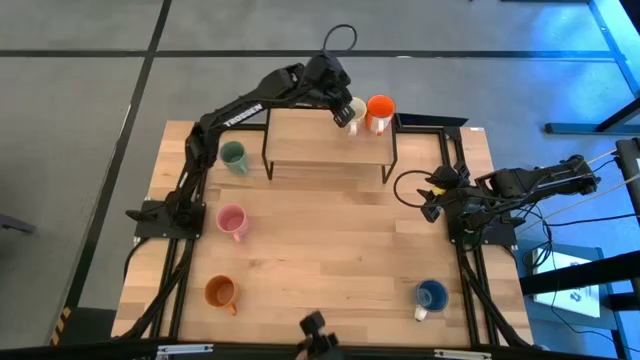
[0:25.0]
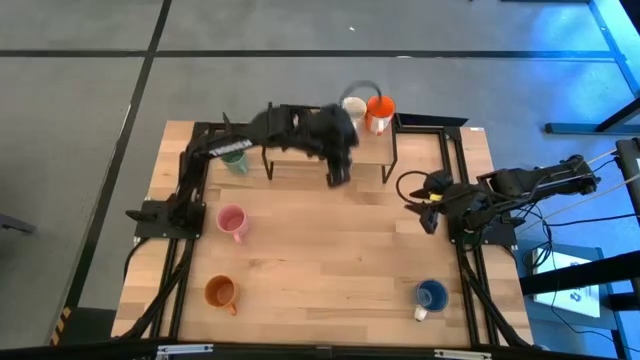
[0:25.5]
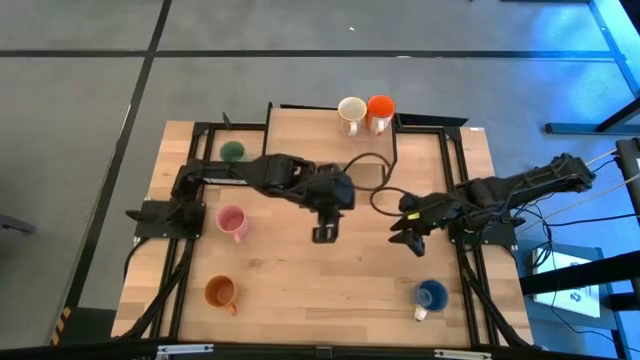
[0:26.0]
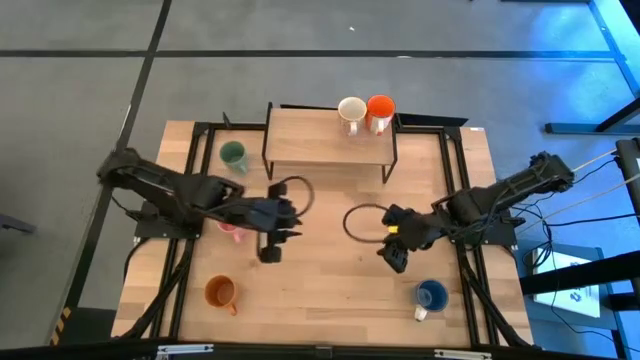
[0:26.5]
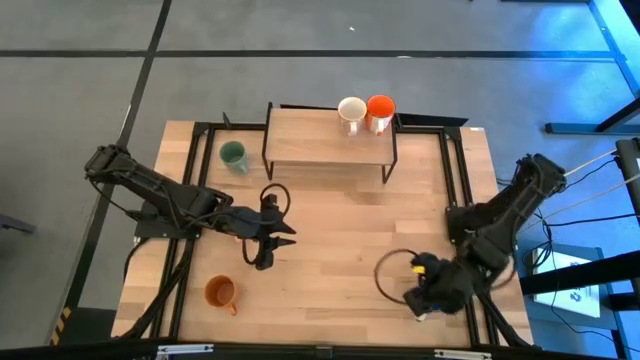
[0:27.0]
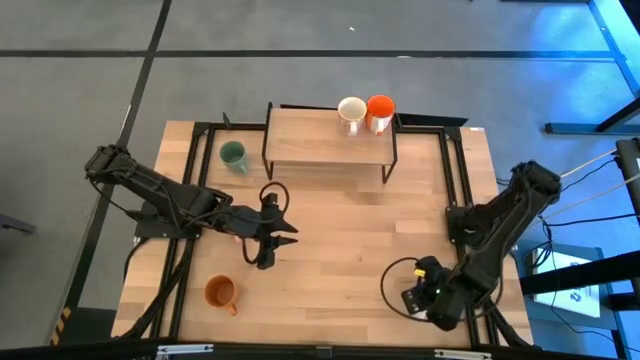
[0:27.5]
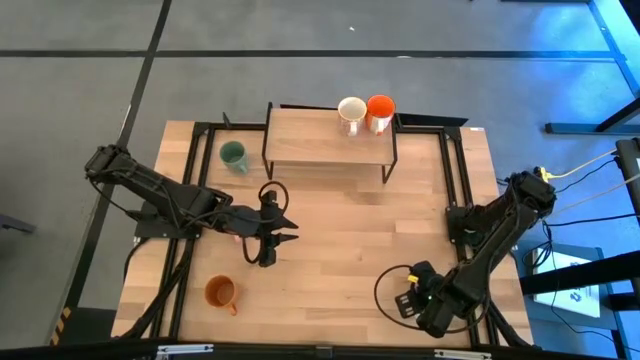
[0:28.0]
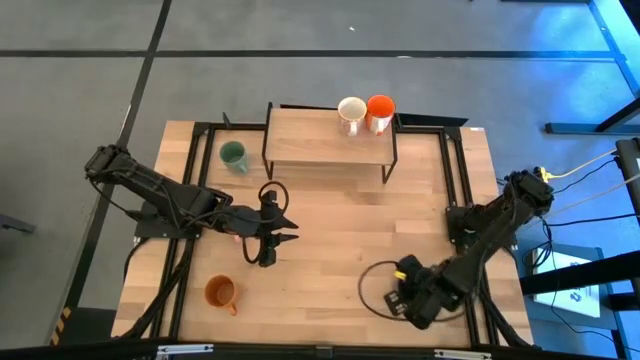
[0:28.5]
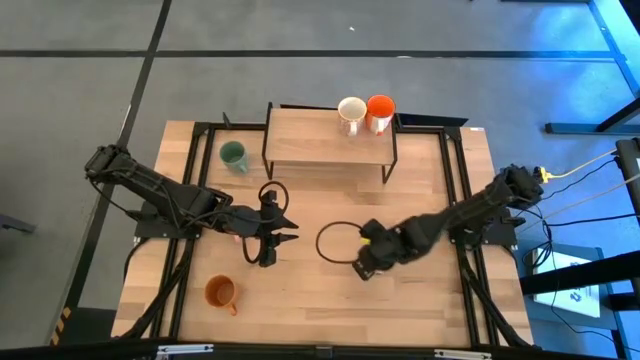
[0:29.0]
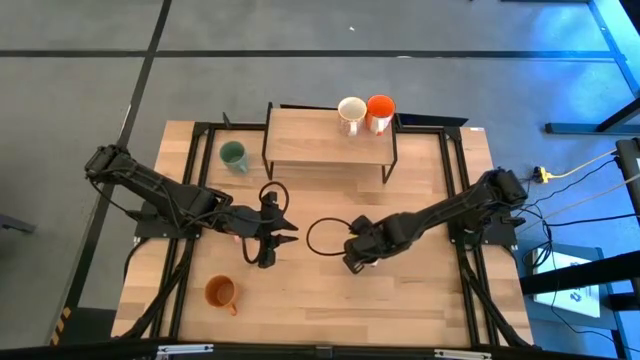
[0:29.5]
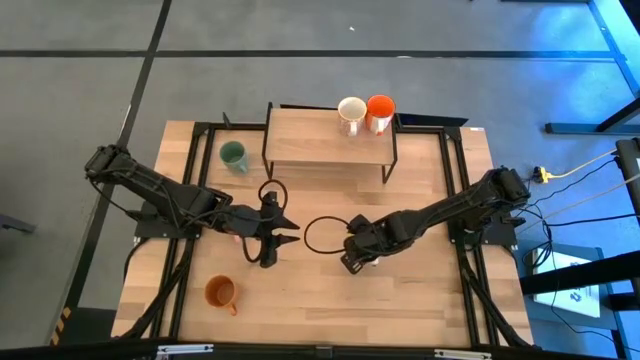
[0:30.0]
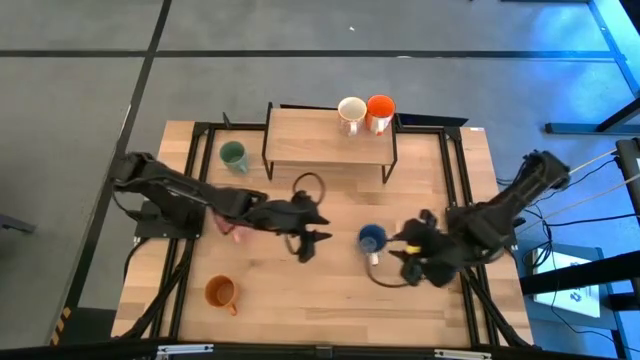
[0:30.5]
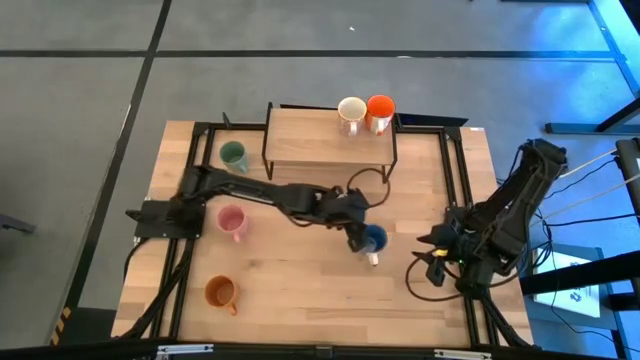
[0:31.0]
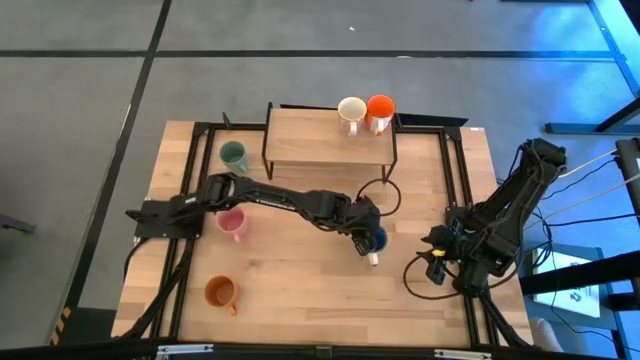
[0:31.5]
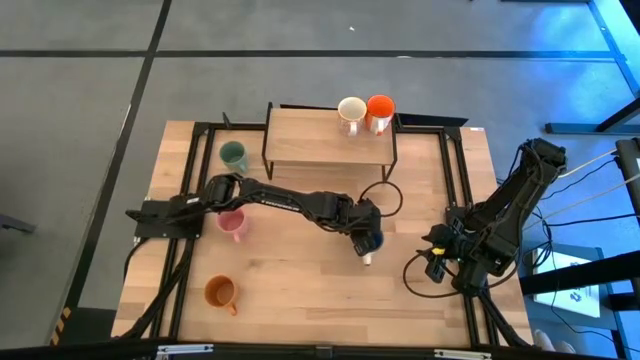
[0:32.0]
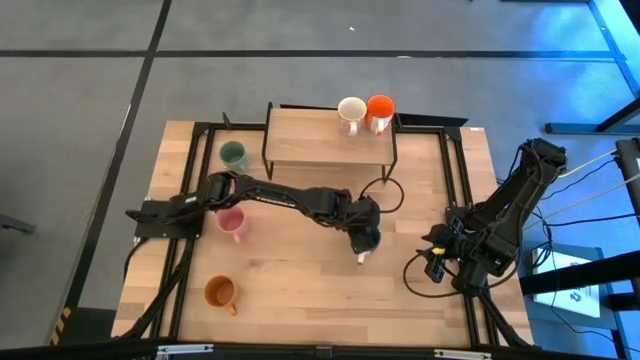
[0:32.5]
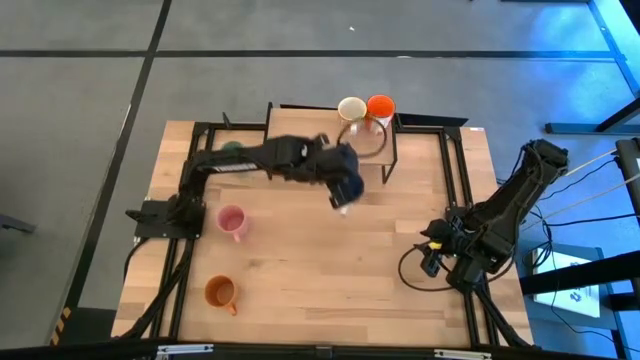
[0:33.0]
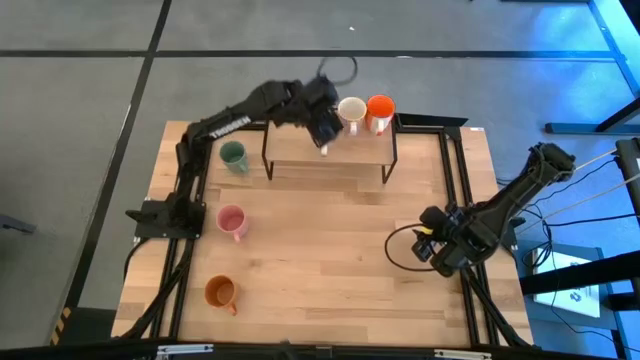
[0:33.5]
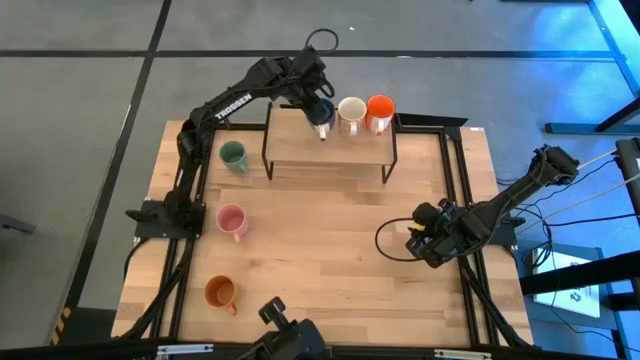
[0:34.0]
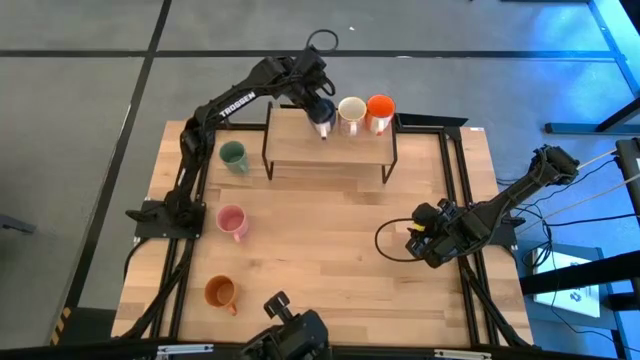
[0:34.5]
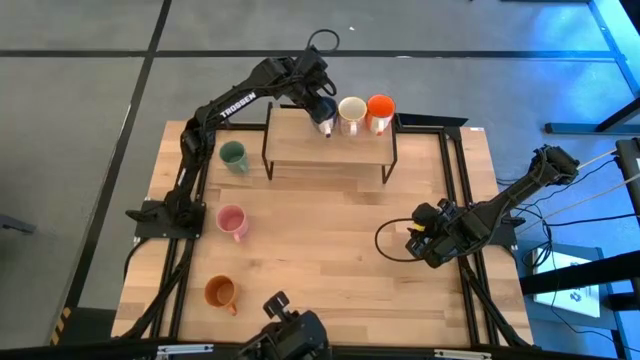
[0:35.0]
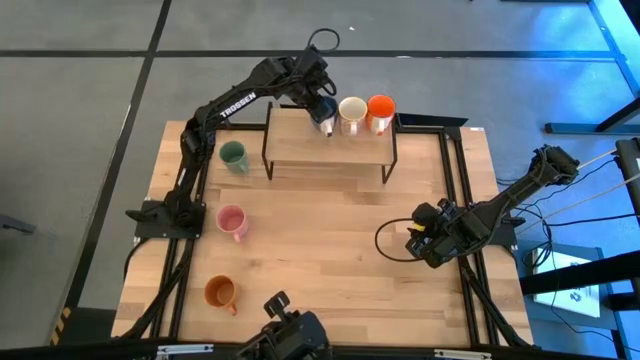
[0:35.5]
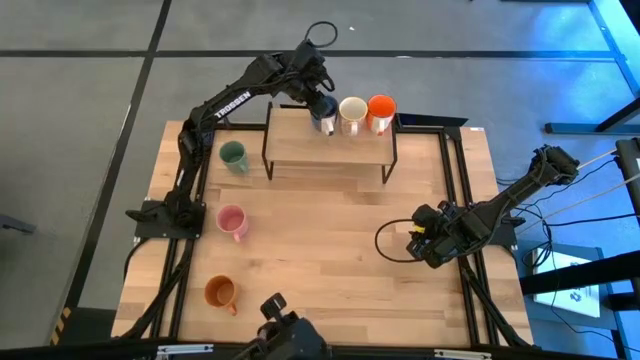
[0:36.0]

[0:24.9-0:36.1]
Task: Place coffee mugs
Put the blue mug on the shelf

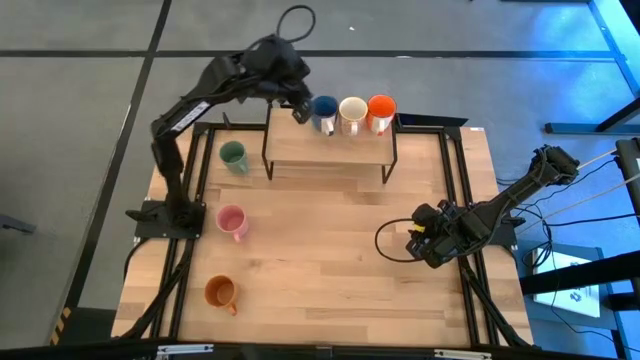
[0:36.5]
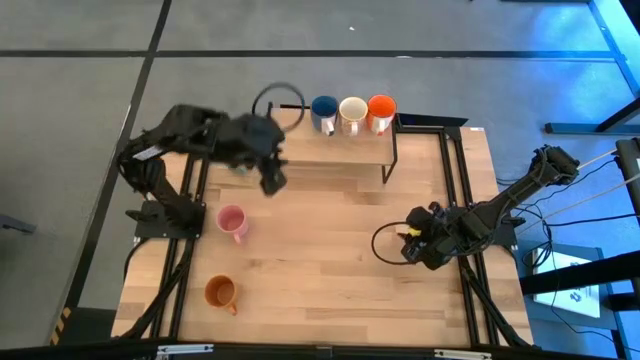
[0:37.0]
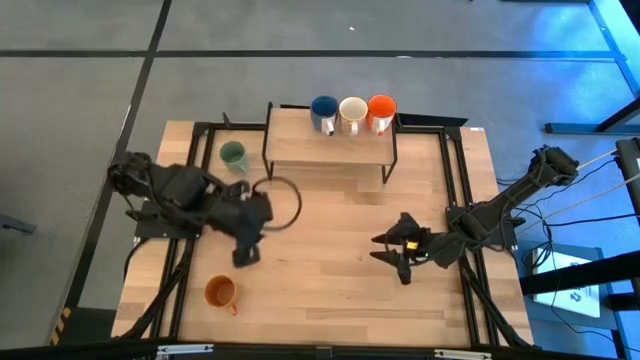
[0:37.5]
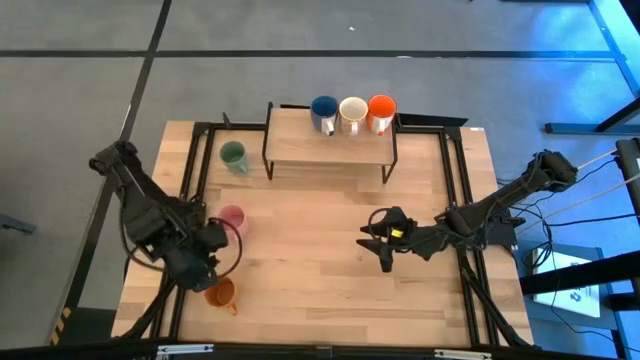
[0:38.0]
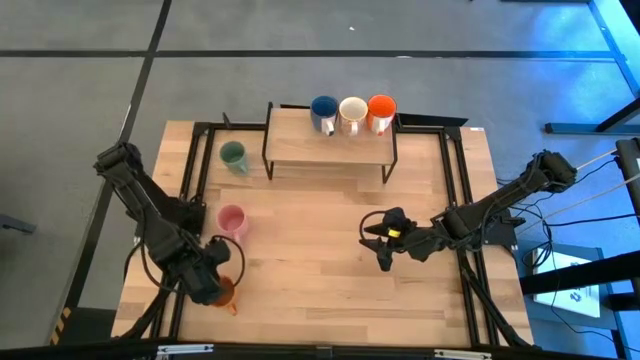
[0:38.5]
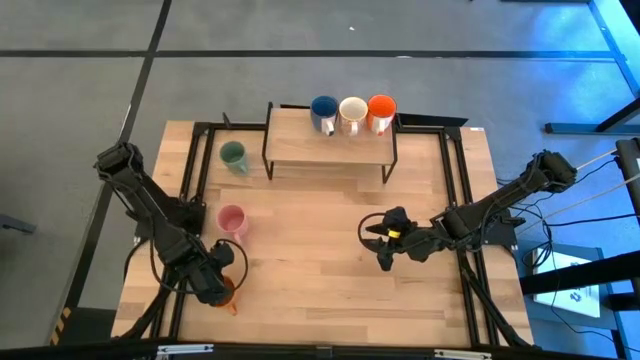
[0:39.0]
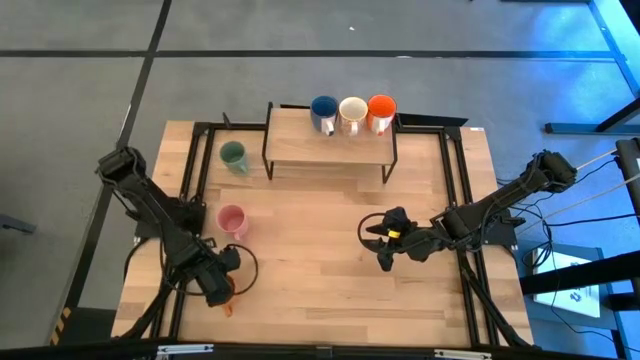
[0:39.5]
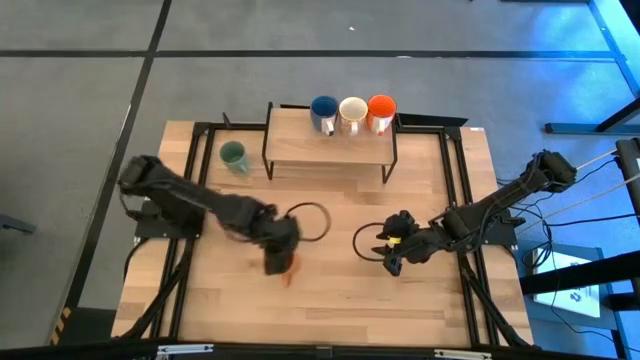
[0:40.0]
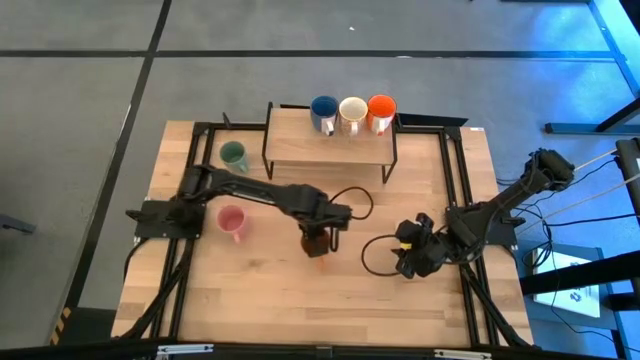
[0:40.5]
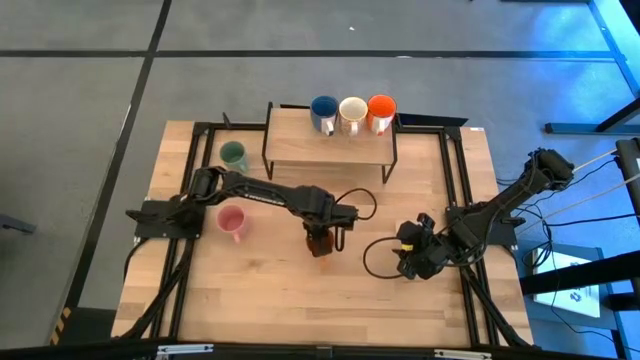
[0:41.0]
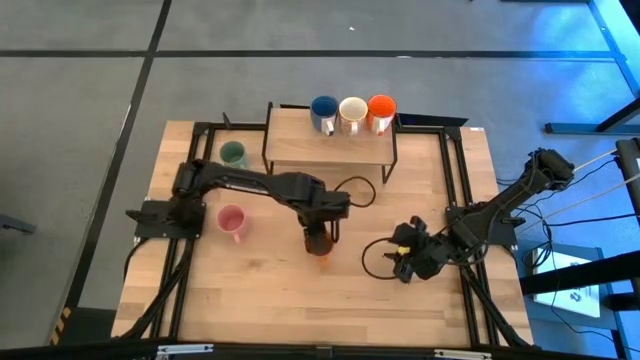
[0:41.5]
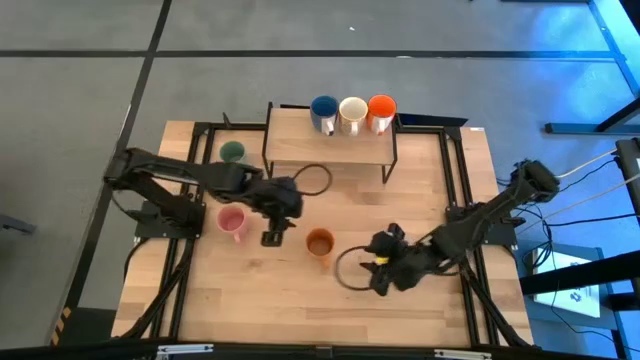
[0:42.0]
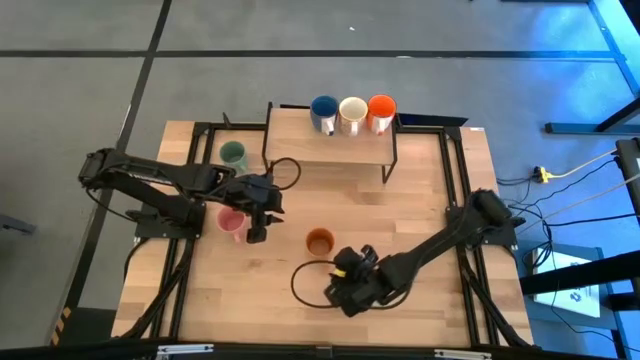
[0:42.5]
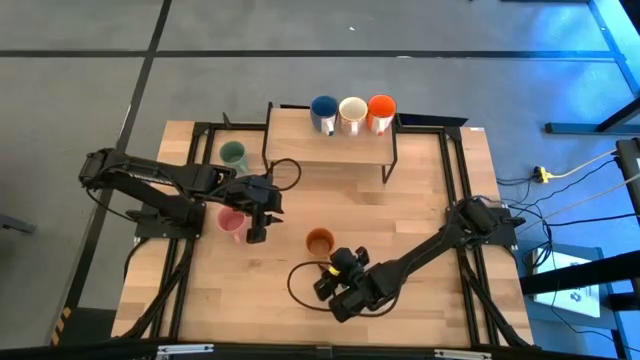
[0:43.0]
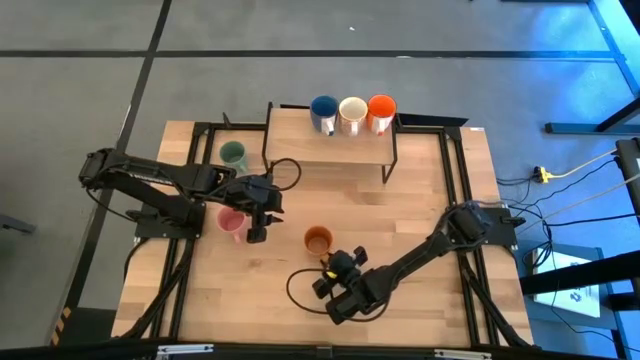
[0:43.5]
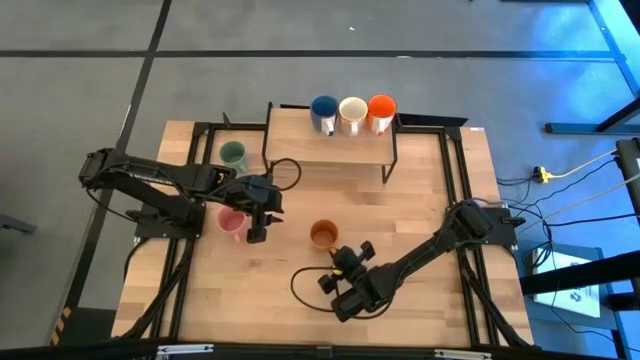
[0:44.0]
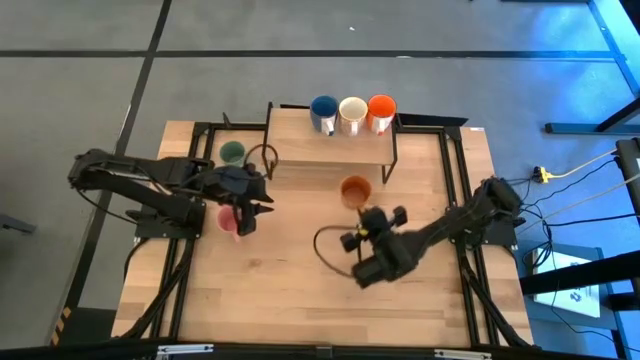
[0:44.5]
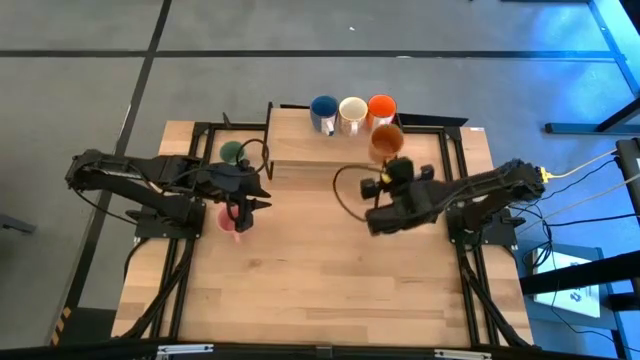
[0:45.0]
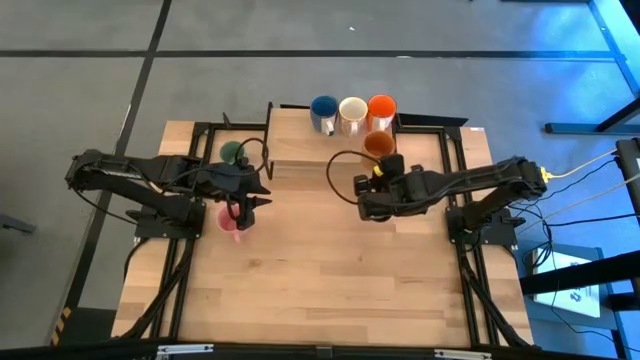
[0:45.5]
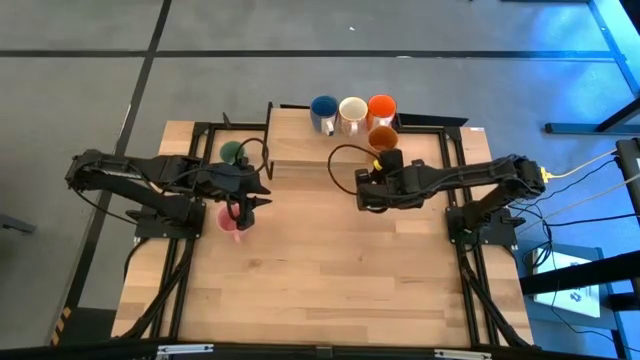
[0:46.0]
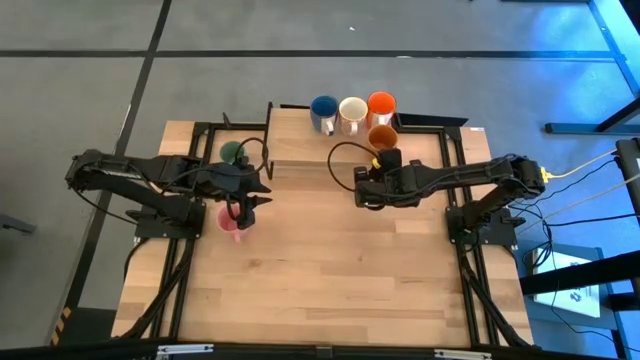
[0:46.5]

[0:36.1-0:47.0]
Put the orange mug on the shelf
